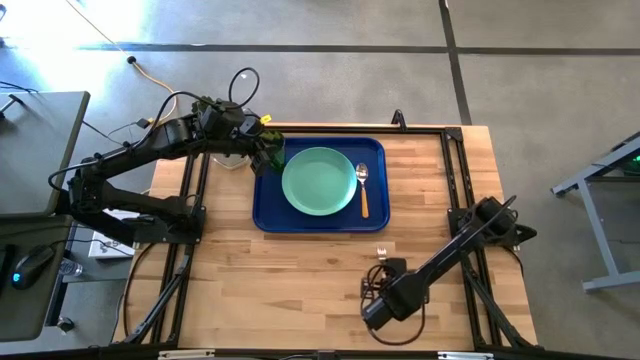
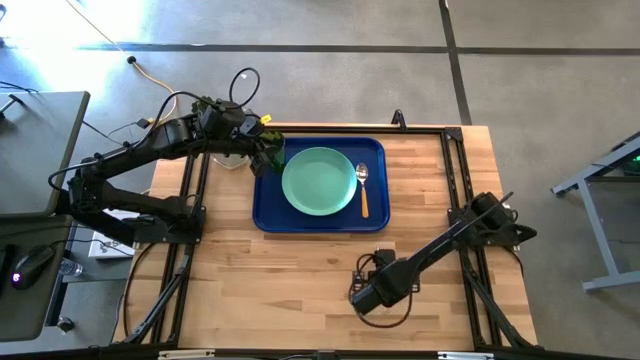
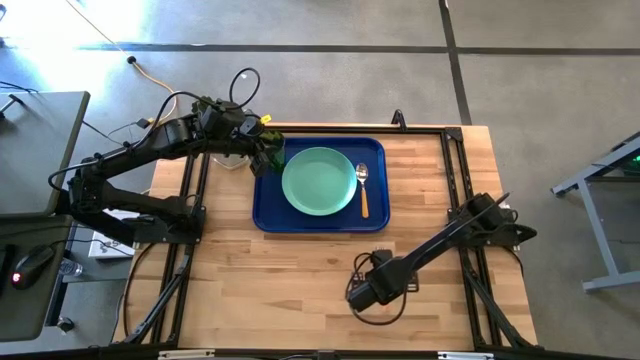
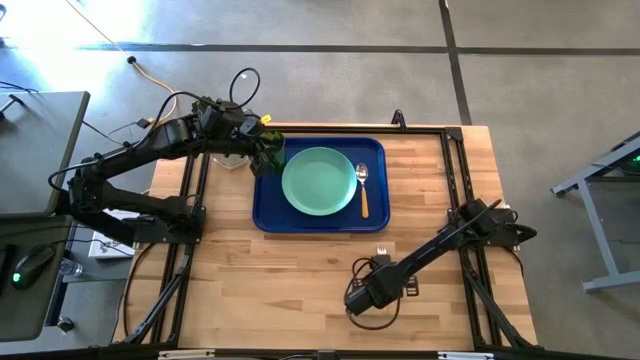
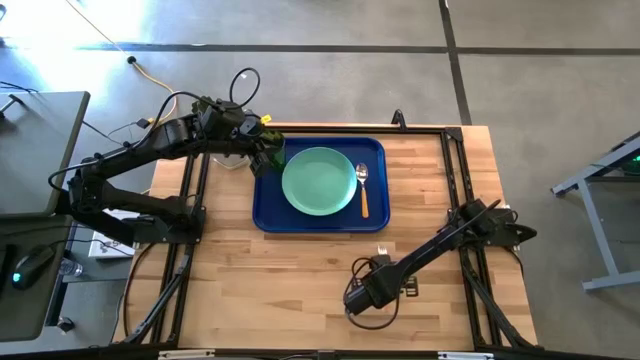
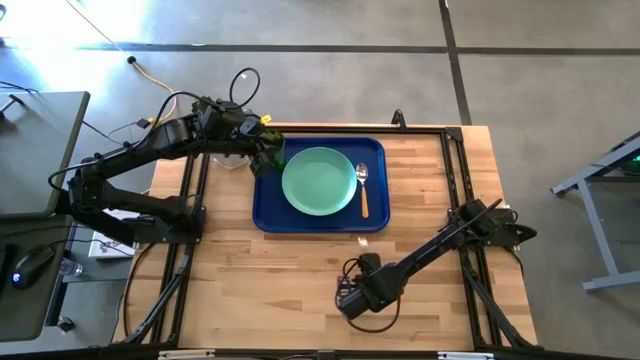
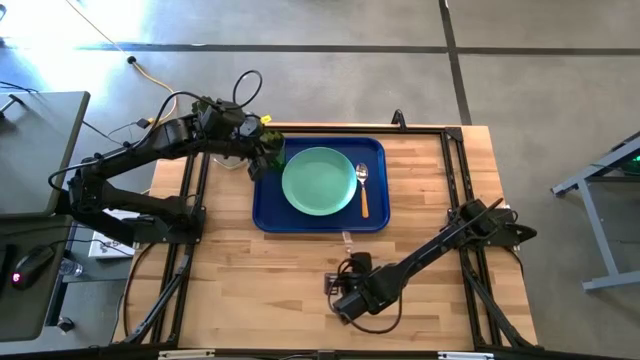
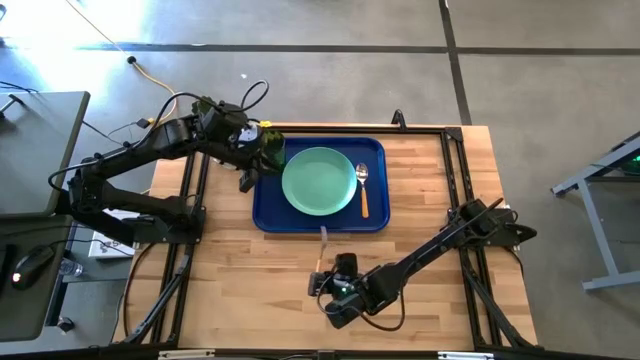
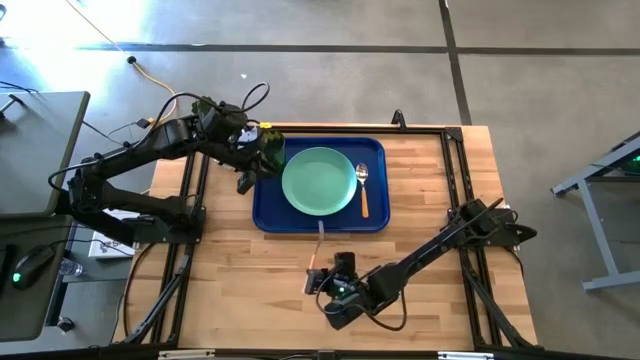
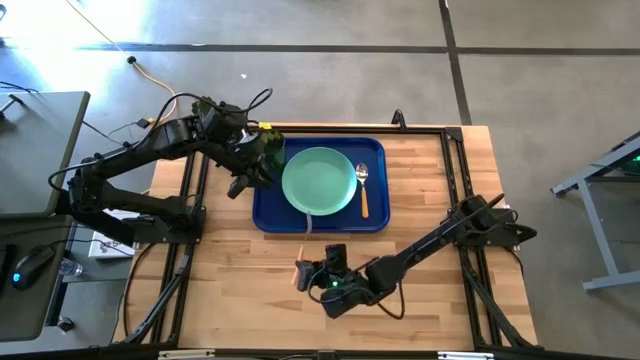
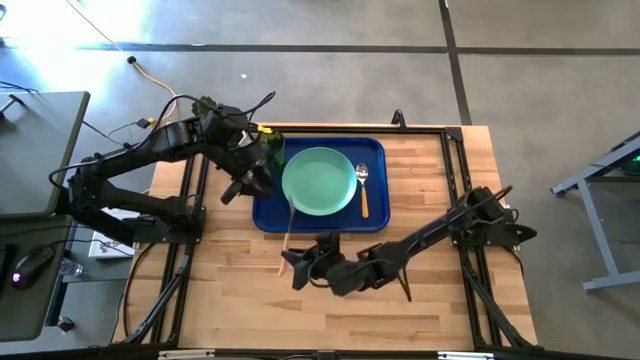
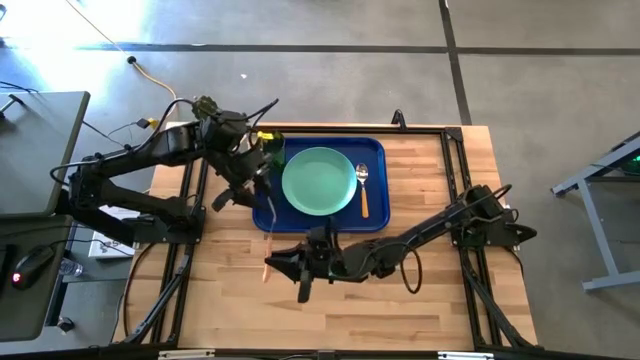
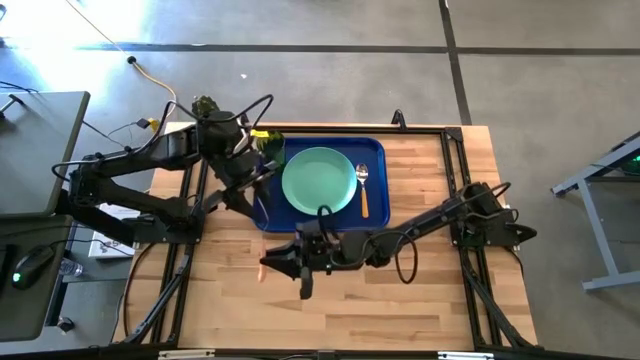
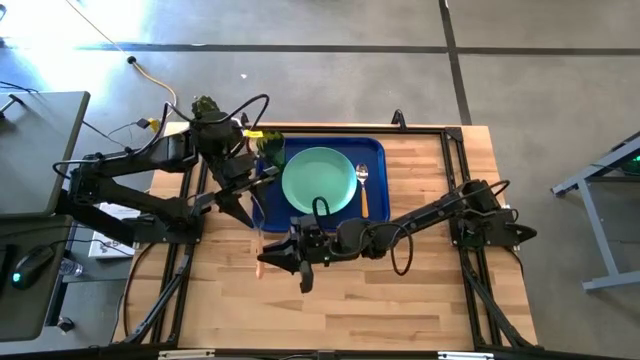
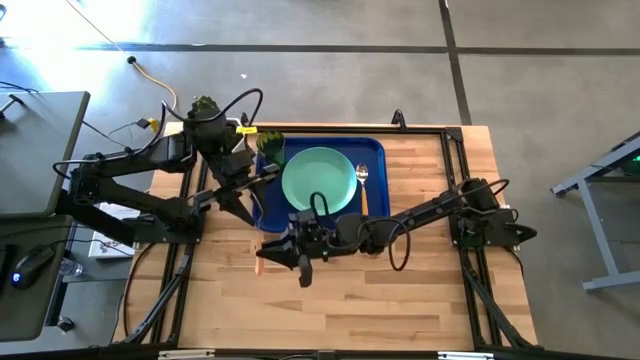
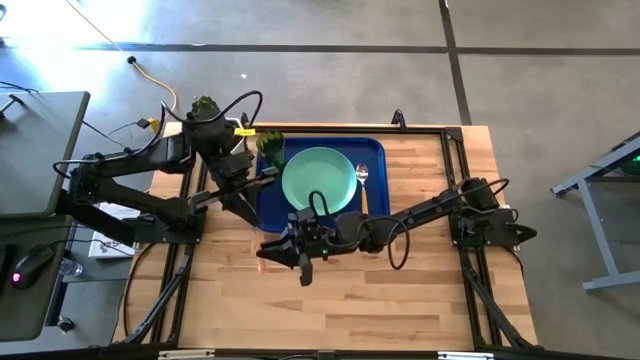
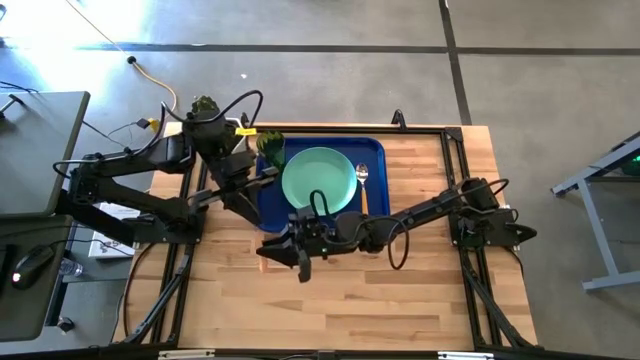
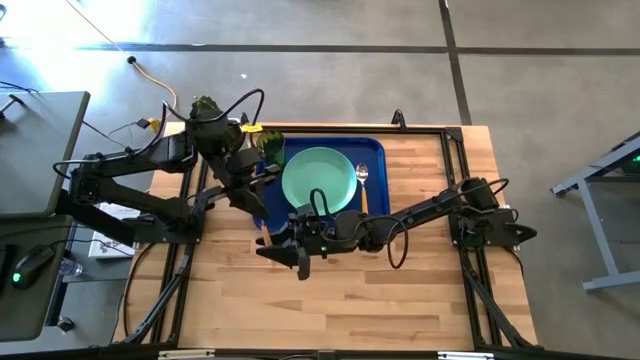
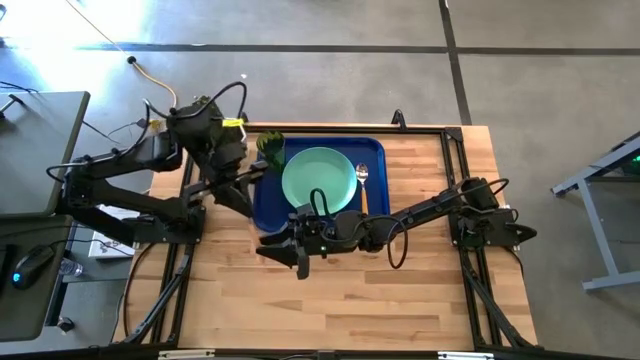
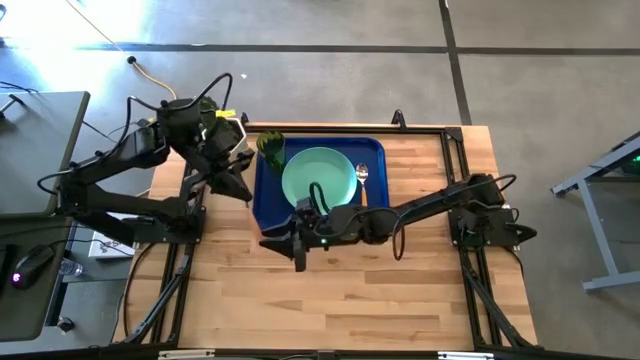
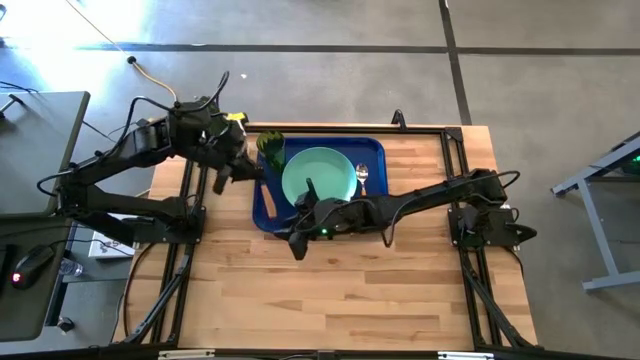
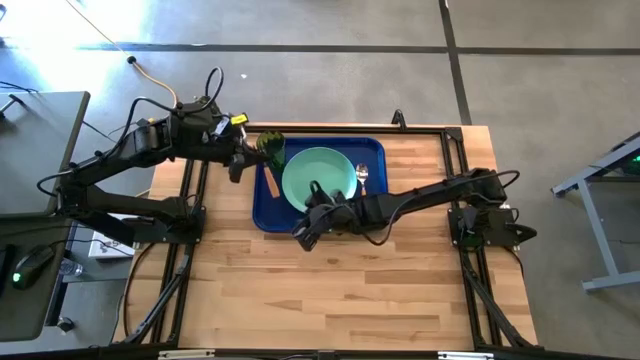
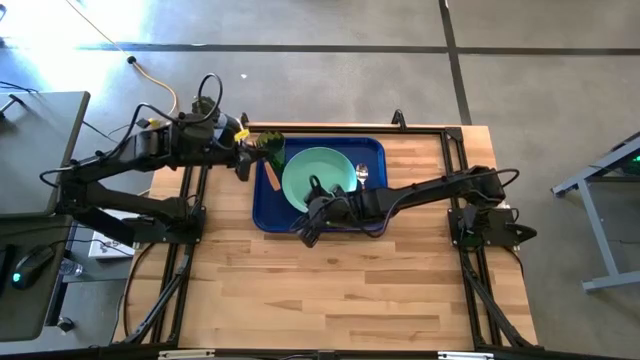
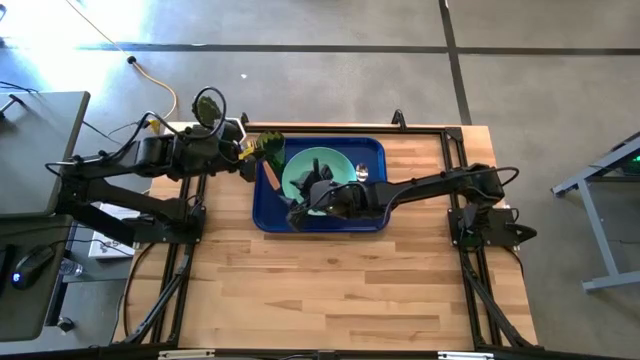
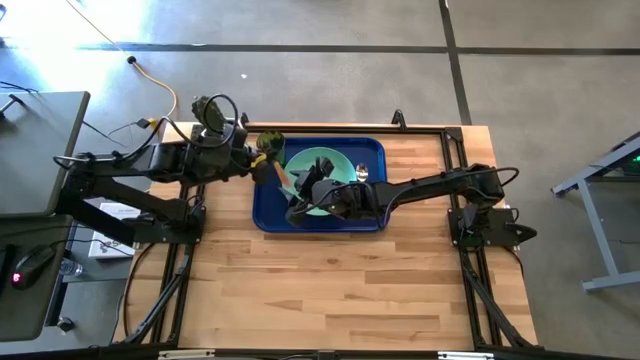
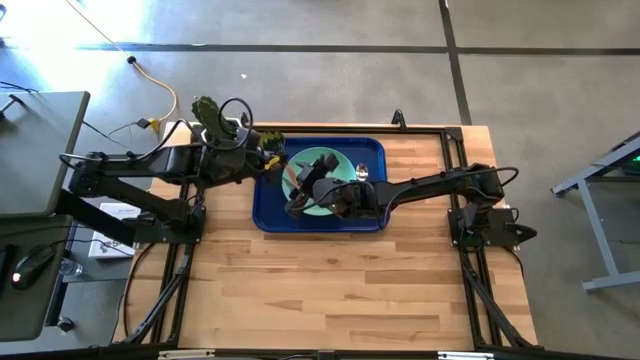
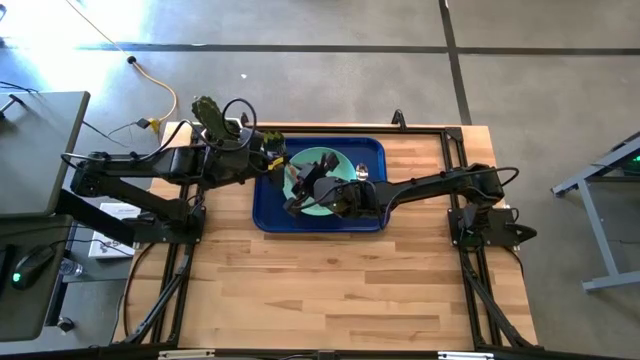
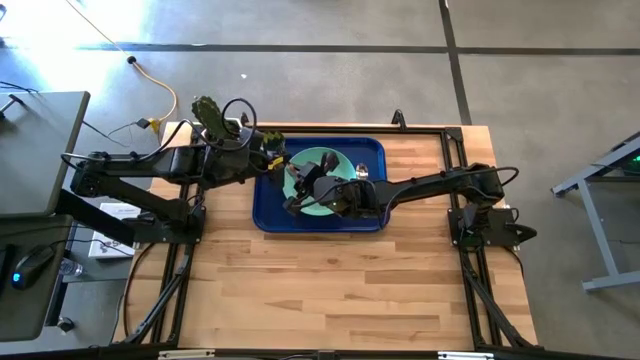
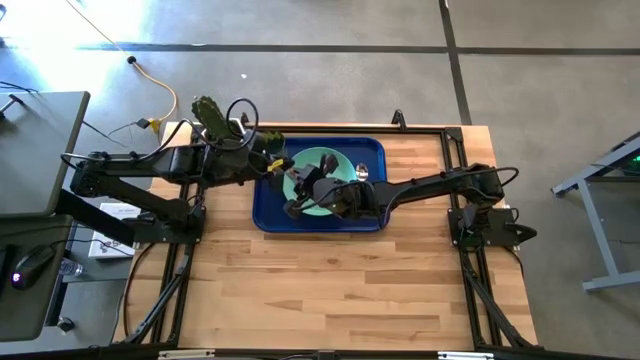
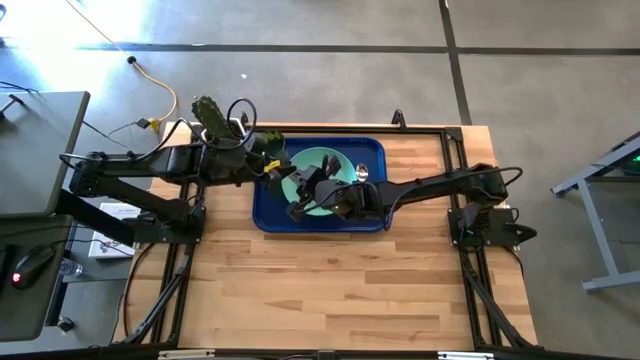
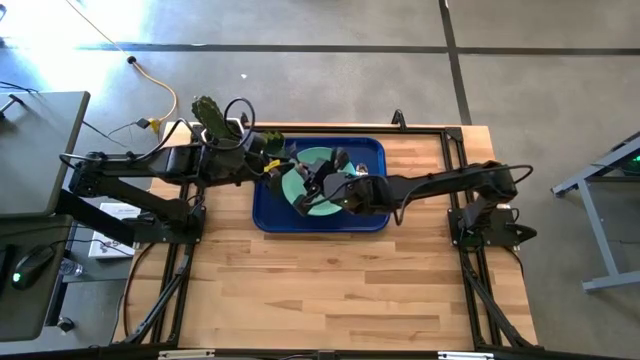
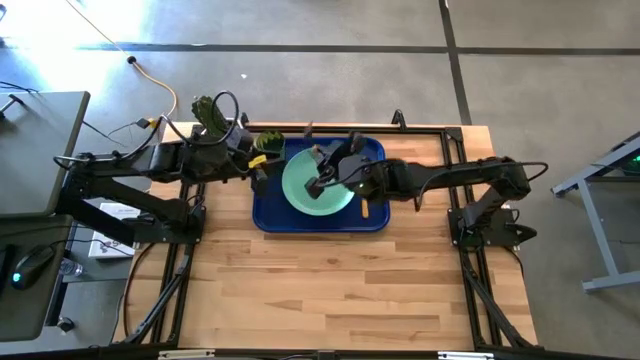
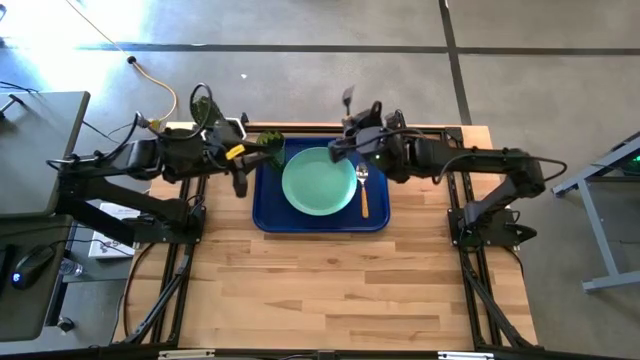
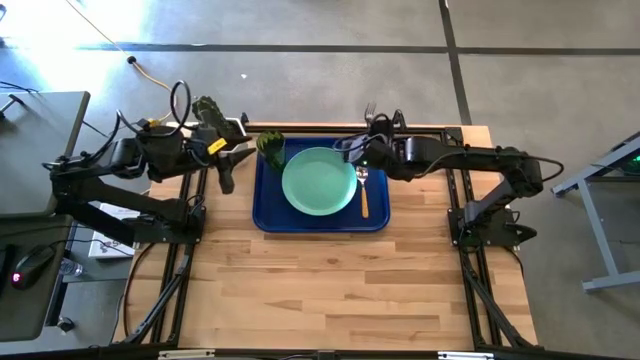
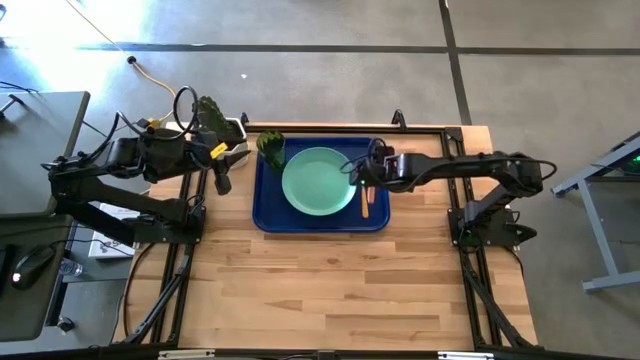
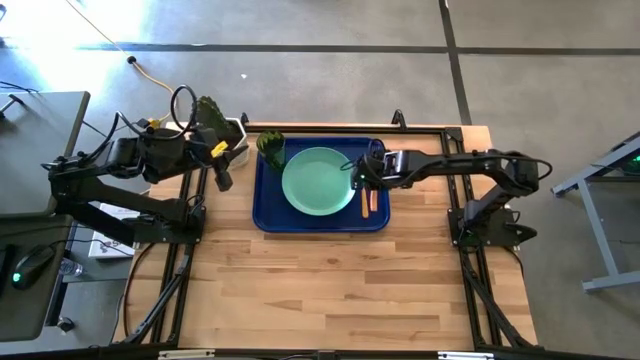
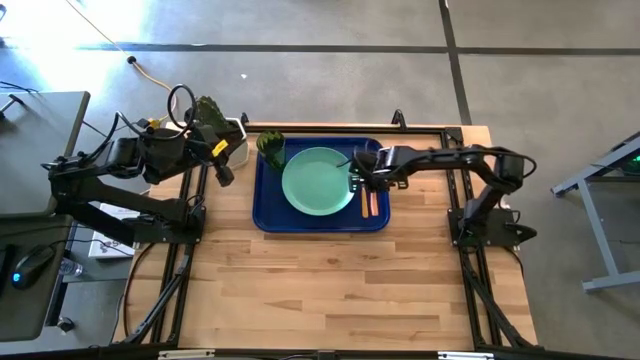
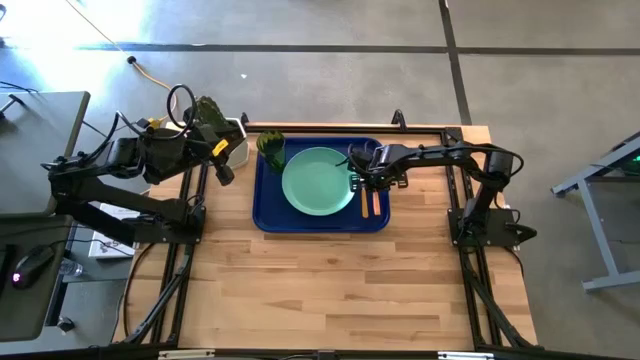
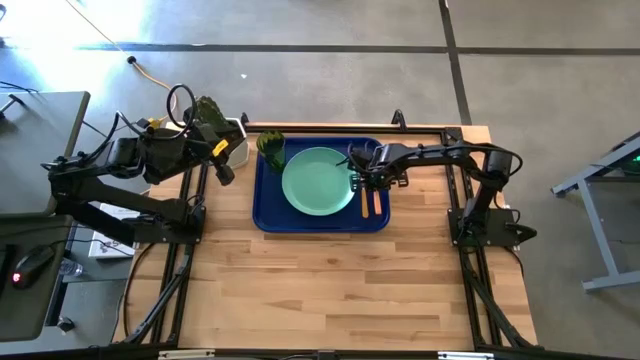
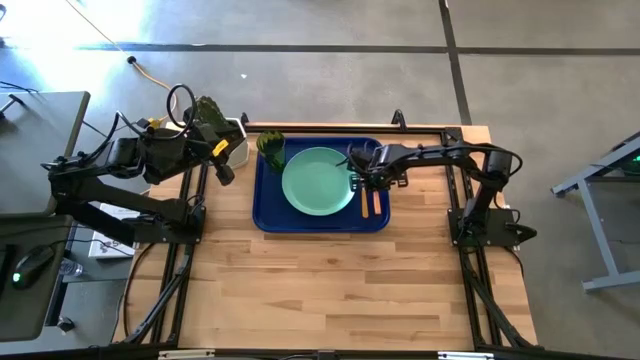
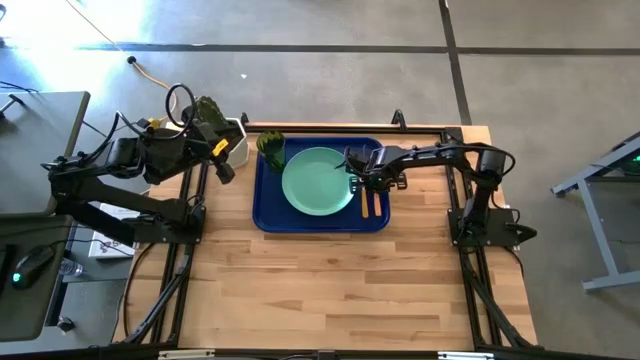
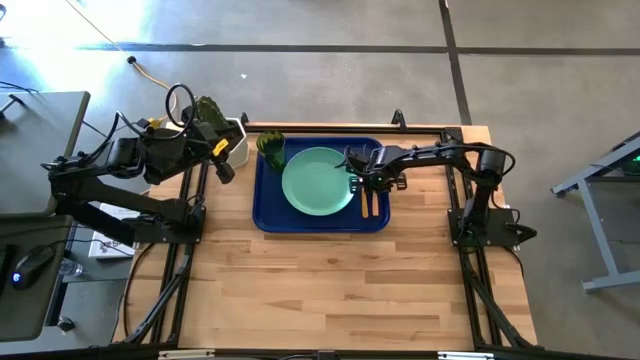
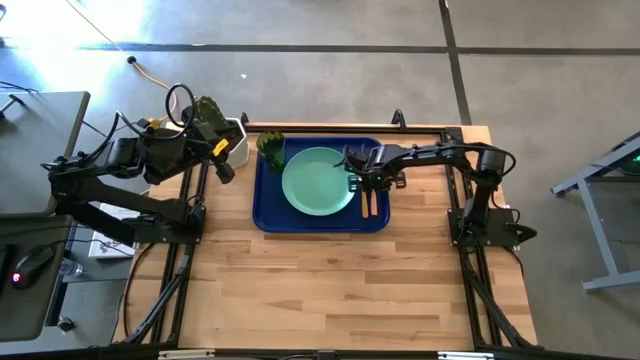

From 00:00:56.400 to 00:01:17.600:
Task: Pick and place plate/cup/fork/spoon on tray
Put the light brown fork to the right of the yellow spoon on the blue tray
